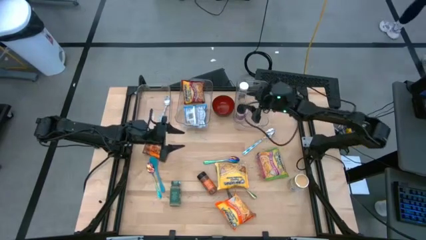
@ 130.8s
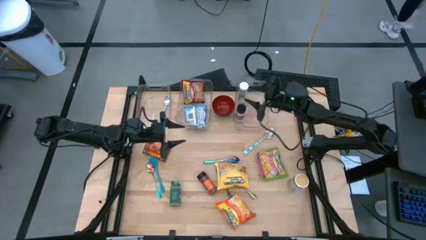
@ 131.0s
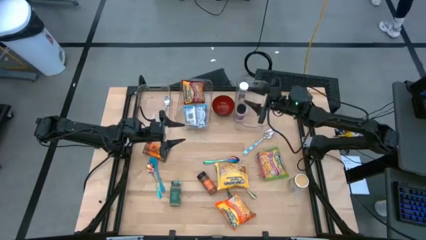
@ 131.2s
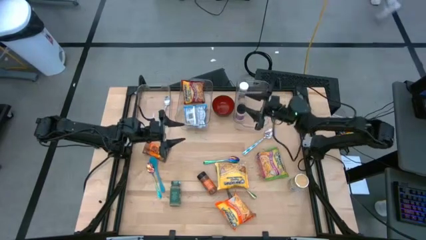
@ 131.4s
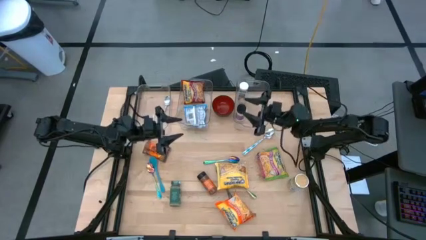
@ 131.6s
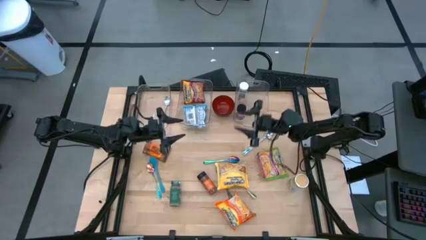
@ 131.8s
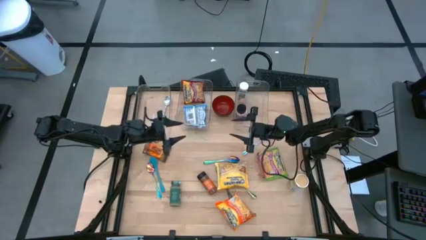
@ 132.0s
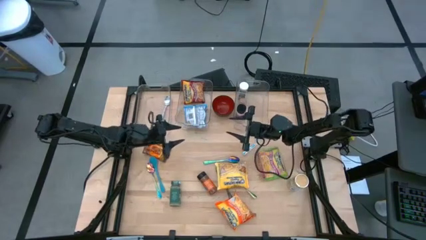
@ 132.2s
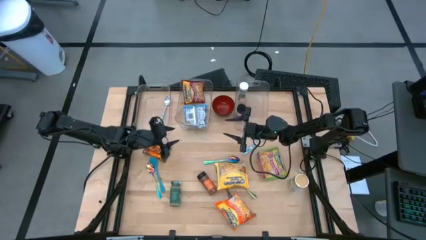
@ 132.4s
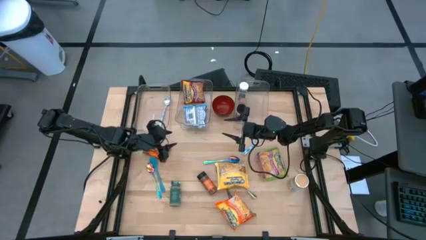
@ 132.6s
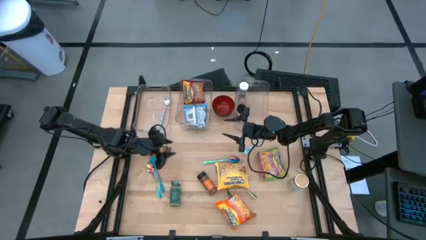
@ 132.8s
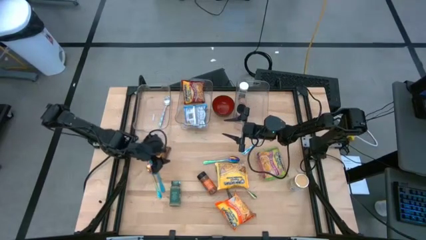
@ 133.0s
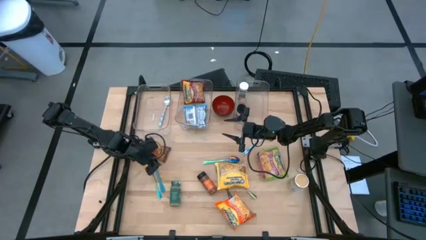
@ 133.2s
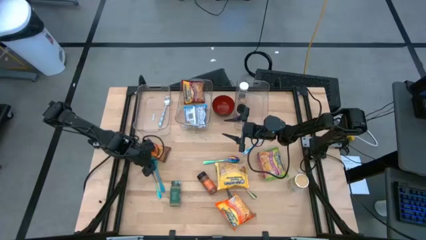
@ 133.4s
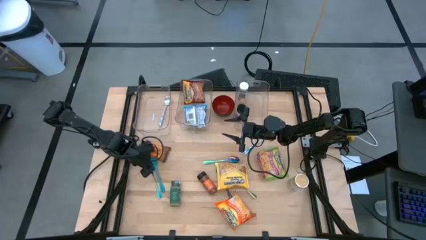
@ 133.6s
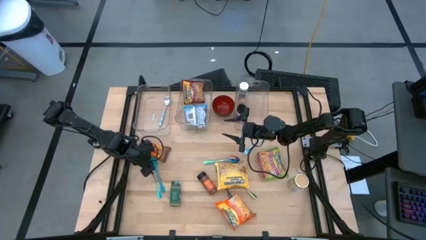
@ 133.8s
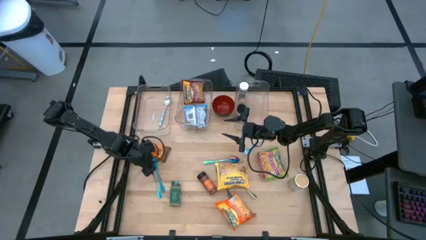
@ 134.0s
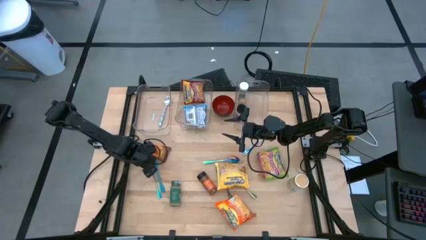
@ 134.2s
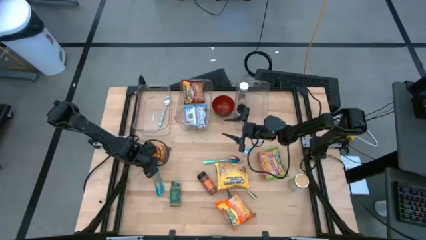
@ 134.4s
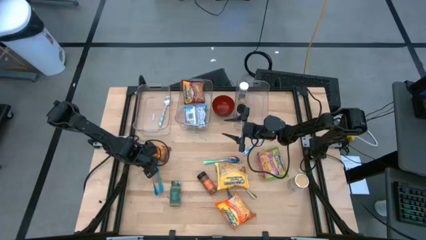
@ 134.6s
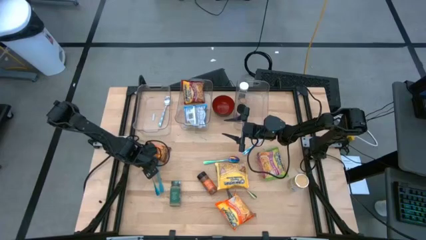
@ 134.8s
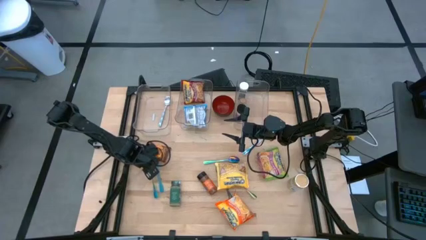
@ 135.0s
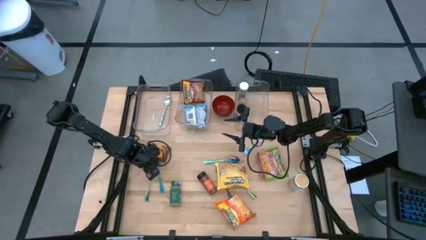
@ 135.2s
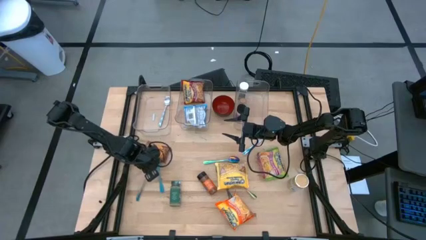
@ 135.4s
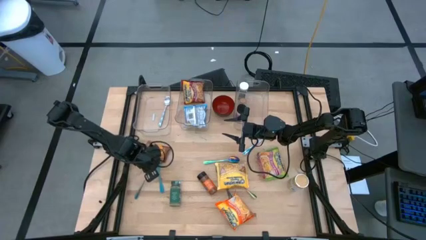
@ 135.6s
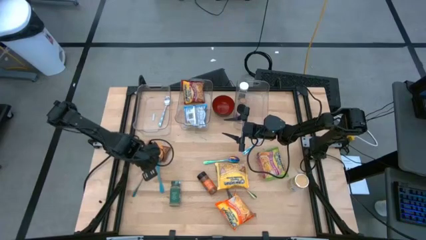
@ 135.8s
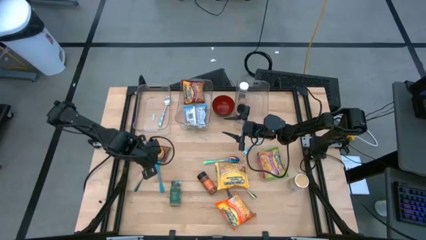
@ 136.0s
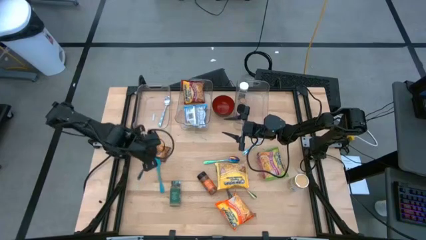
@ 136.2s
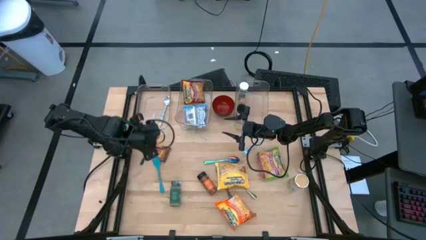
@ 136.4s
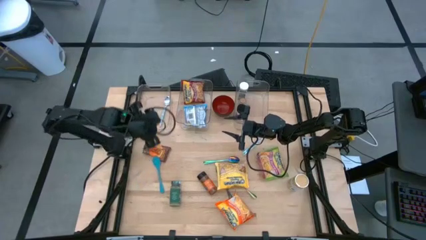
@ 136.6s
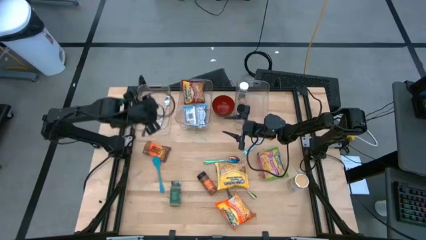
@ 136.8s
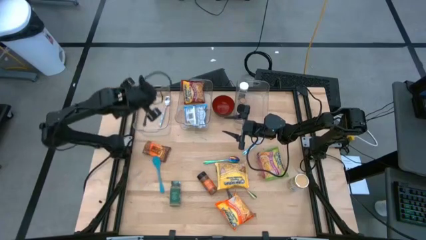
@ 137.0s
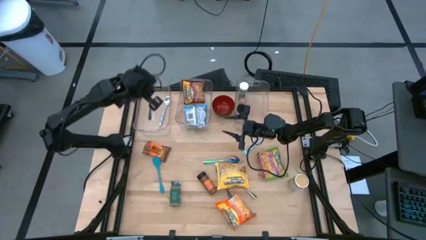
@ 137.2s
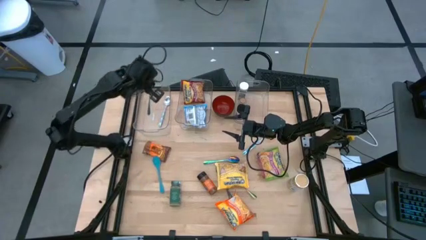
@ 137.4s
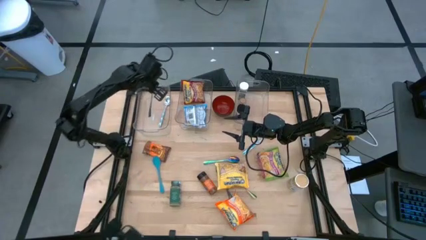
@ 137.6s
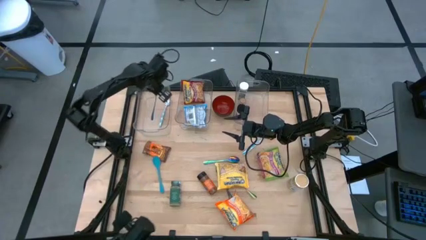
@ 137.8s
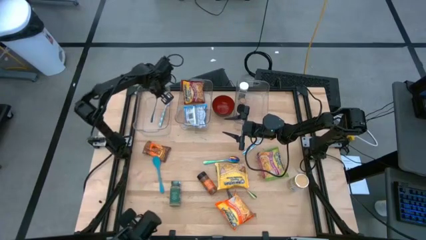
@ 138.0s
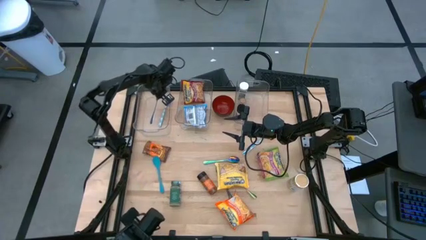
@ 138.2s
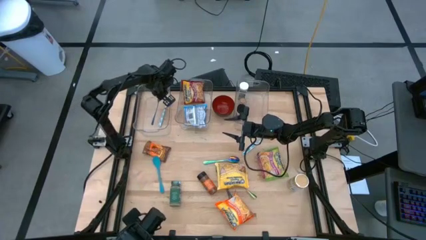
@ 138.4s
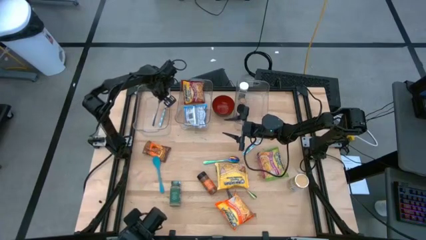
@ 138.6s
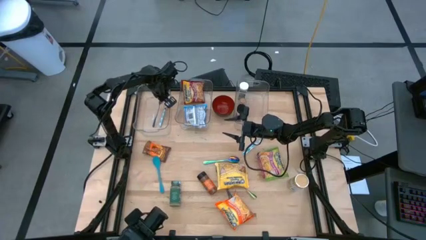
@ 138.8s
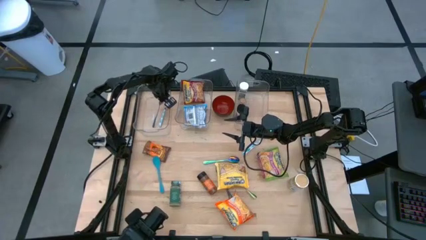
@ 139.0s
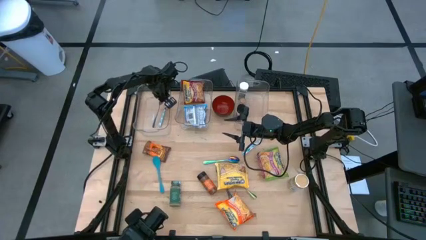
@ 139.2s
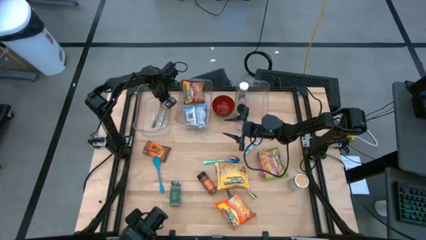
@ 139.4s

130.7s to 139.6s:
Task: Pick & Place Food Item
Put the green spoon into the left transparent bin

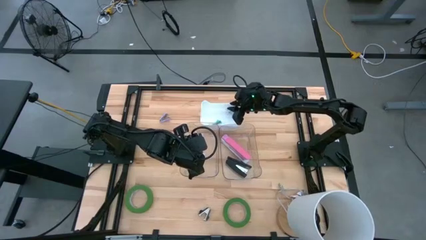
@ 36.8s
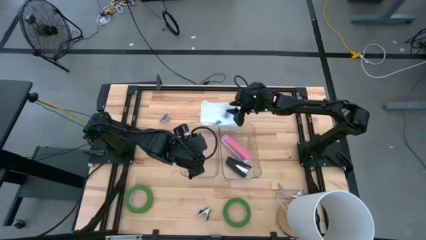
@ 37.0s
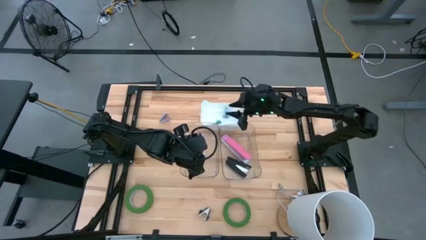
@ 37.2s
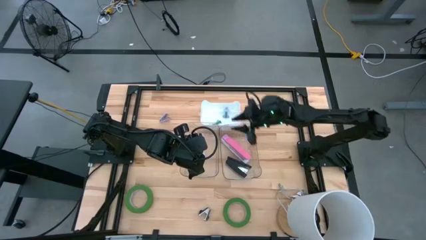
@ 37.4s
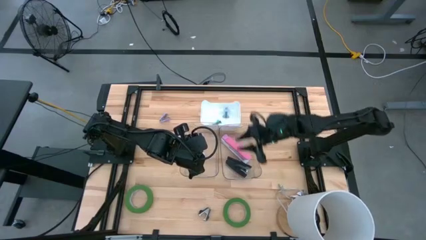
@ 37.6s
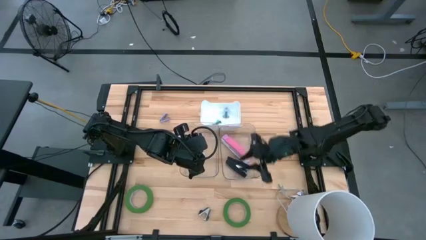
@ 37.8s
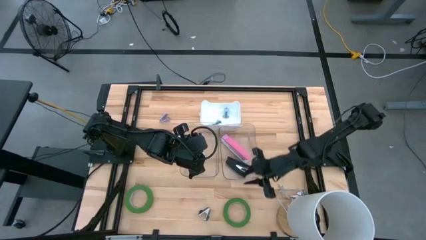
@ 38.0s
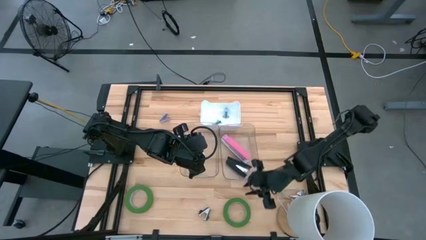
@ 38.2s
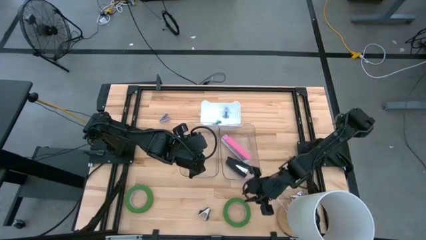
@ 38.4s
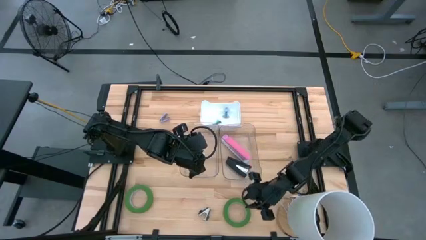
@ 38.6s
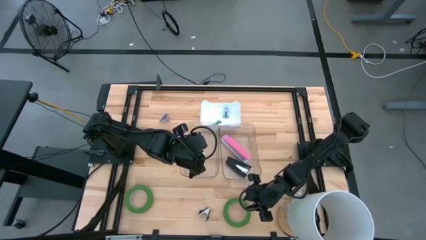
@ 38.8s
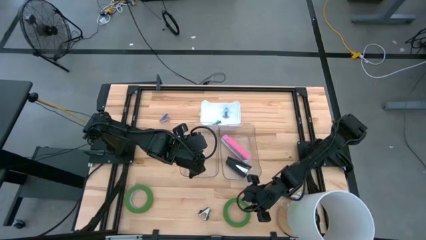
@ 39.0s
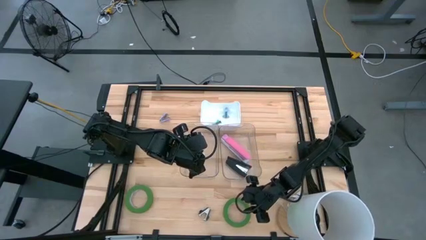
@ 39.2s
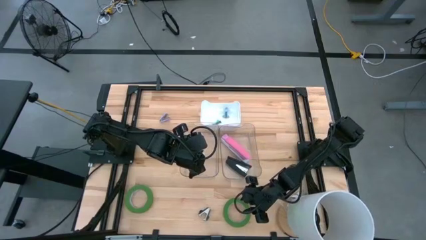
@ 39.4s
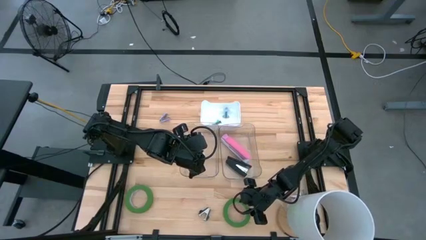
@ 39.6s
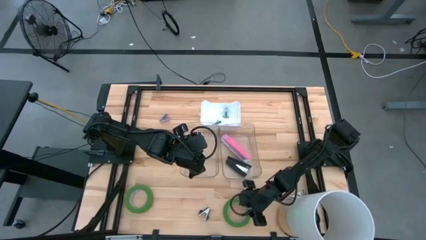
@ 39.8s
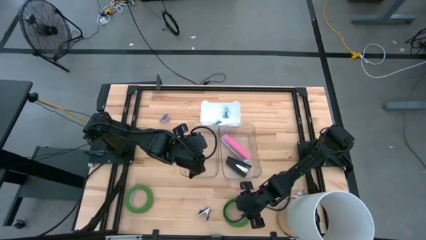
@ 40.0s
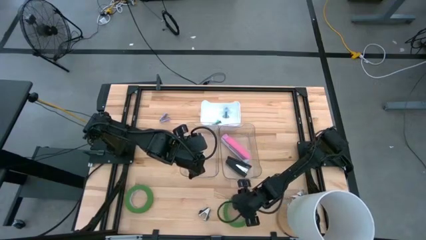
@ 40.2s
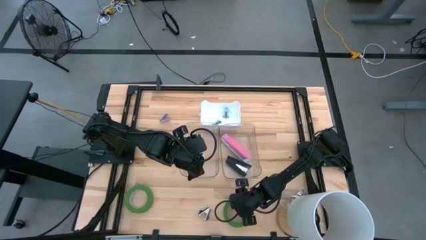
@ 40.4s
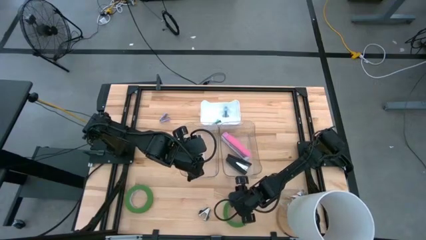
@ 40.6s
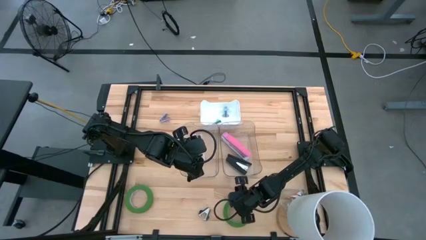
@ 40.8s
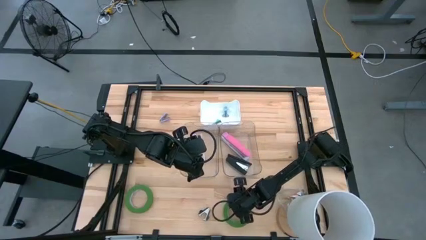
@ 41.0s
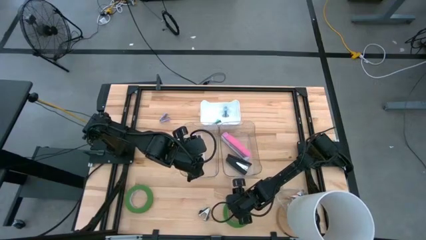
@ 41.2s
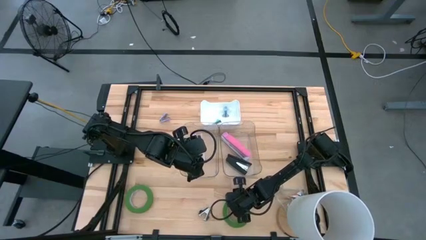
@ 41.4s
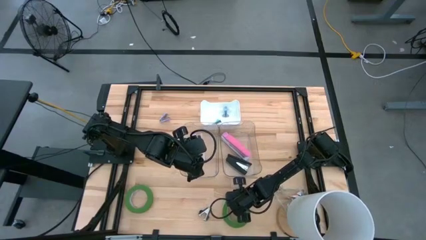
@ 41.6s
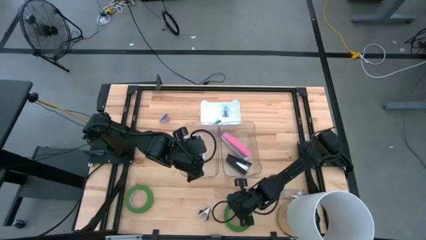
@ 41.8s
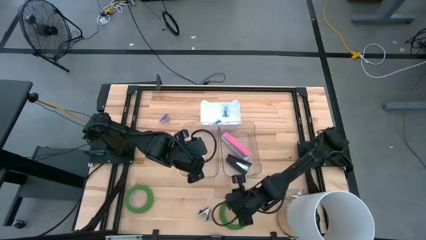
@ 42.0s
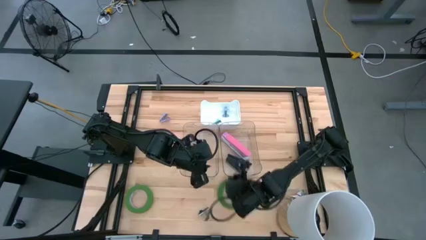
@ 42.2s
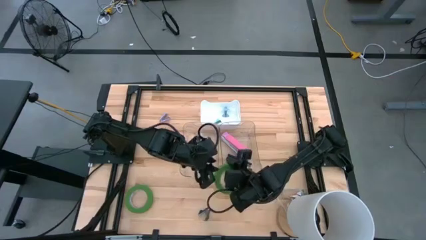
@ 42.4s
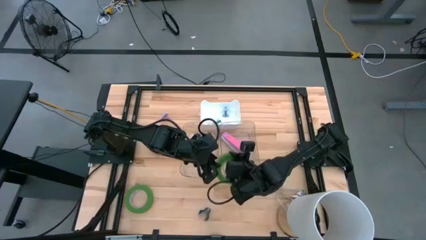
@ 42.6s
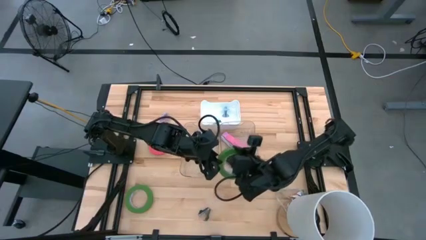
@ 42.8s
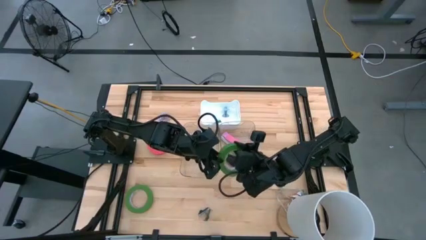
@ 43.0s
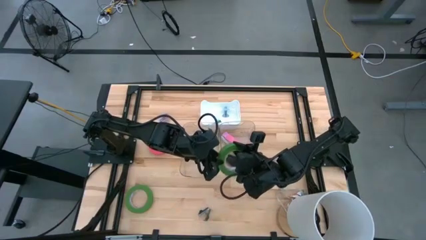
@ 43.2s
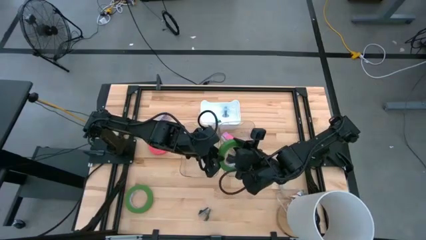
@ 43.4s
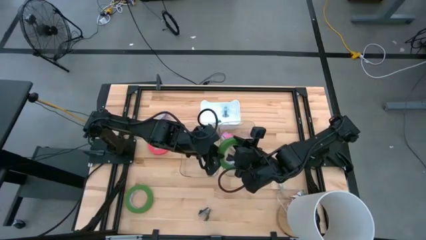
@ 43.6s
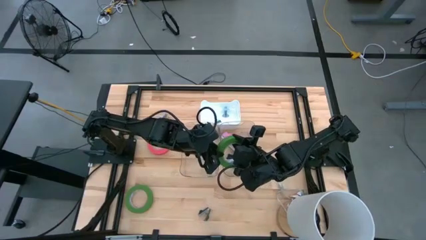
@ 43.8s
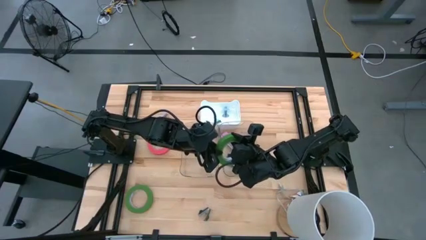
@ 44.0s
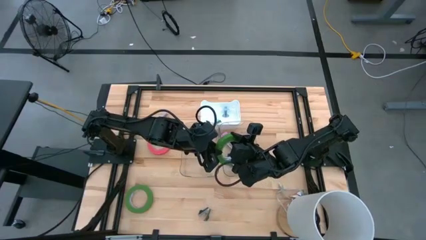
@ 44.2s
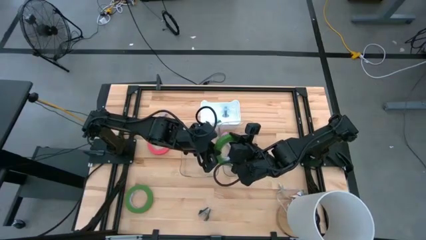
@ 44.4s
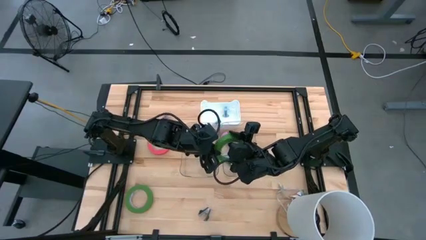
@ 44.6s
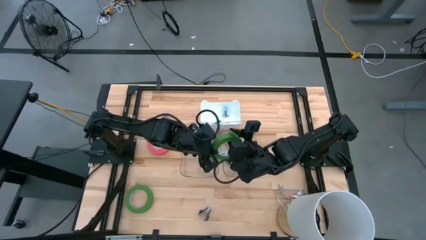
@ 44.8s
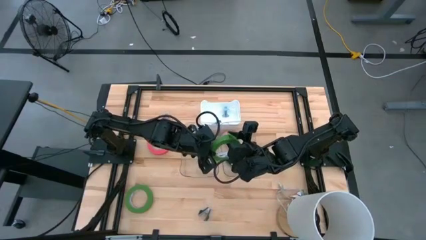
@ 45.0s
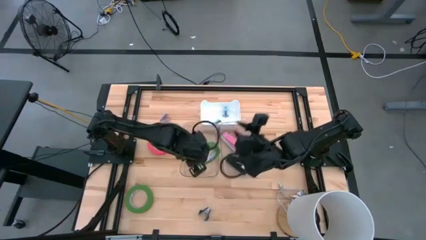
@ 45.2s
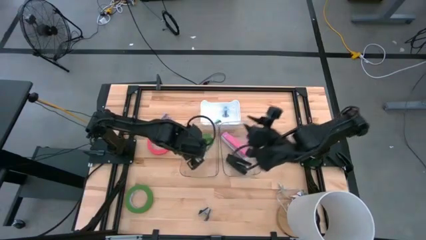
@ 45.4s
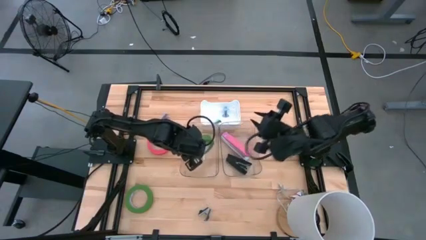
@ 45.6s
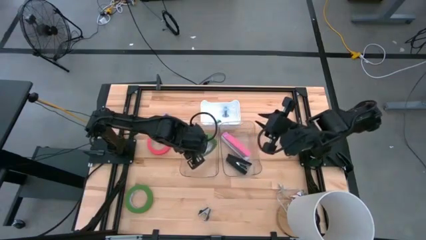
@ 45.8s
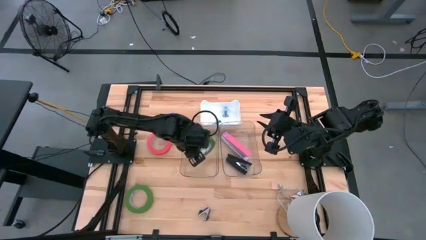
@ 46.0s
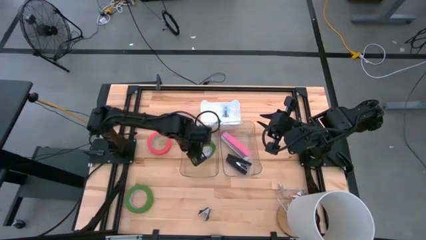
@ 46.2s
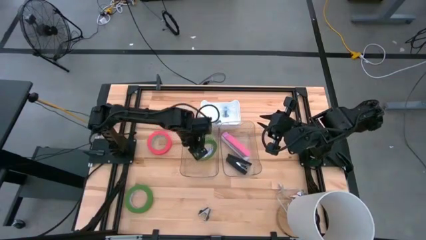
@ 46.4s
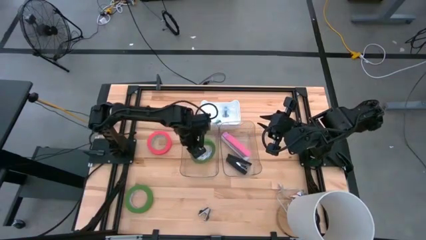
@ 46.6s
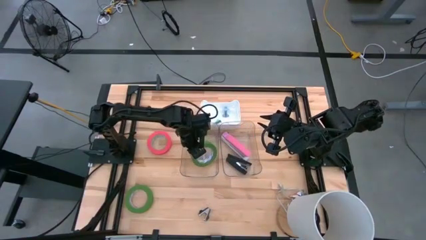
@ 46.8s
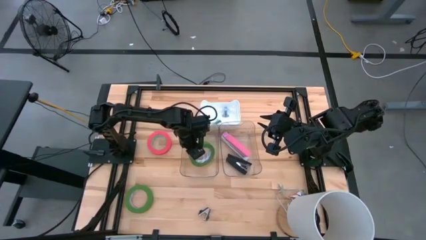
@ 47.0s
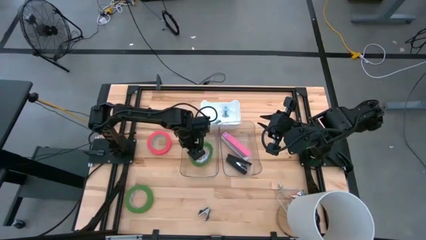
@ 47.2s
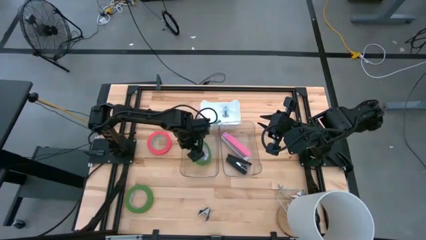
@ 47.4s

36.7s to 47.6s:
Task: Pick and place Stapler, Stapler remover, tape
Put the right green tape into the left transparent bin
